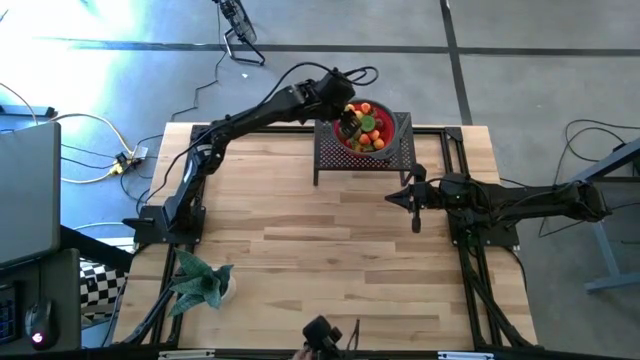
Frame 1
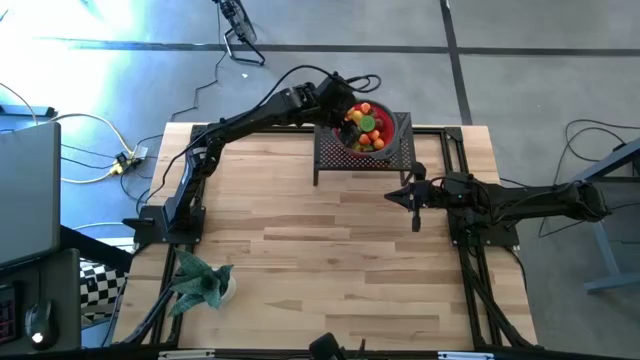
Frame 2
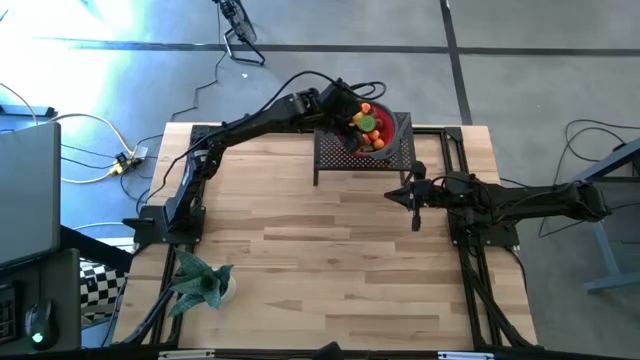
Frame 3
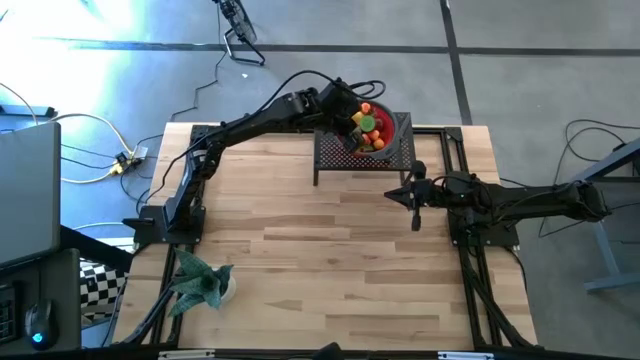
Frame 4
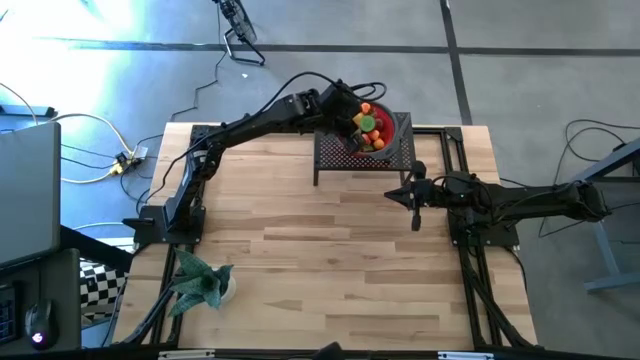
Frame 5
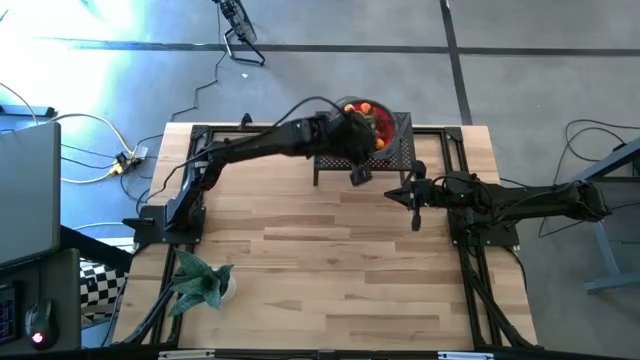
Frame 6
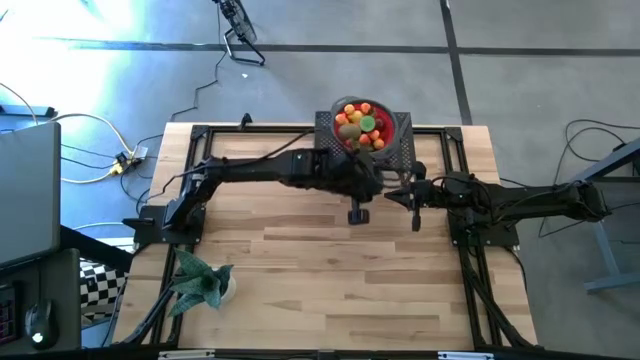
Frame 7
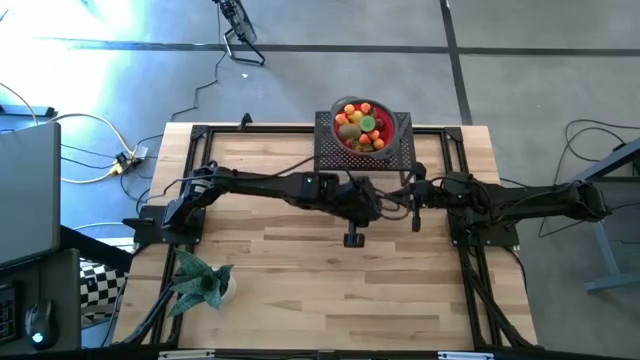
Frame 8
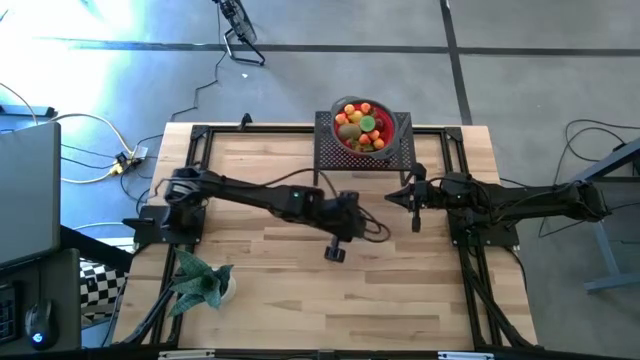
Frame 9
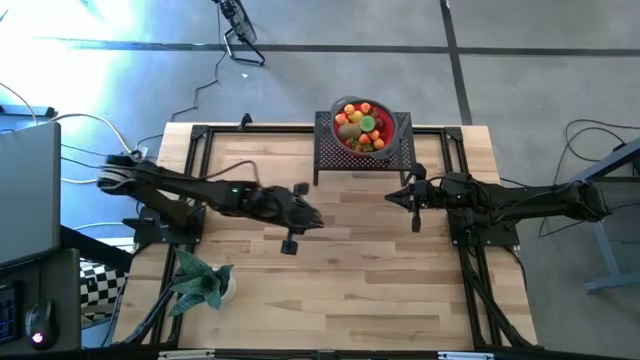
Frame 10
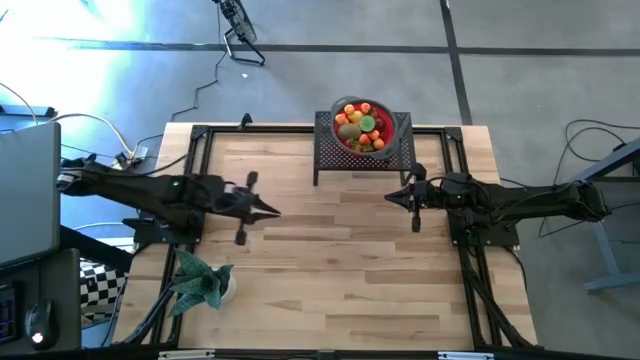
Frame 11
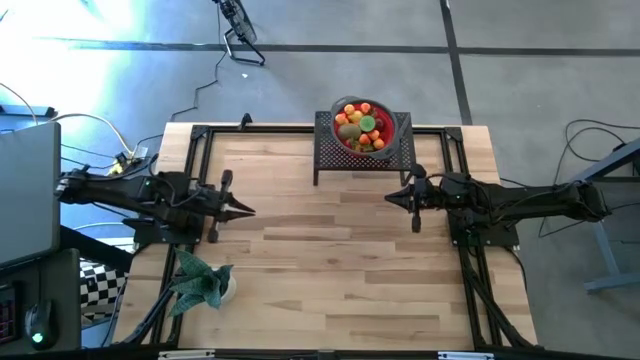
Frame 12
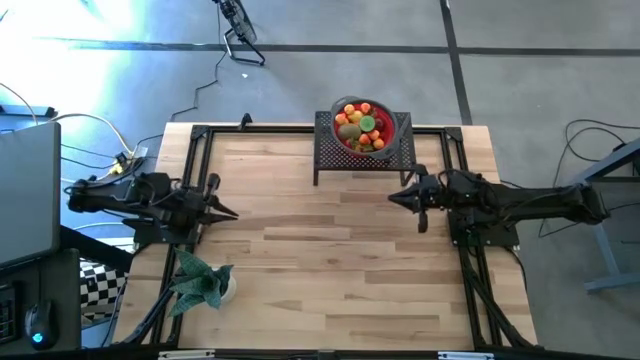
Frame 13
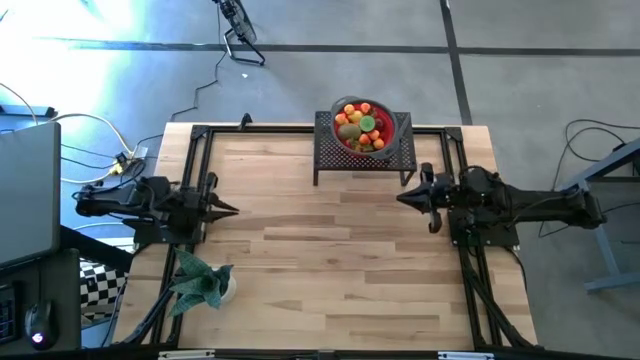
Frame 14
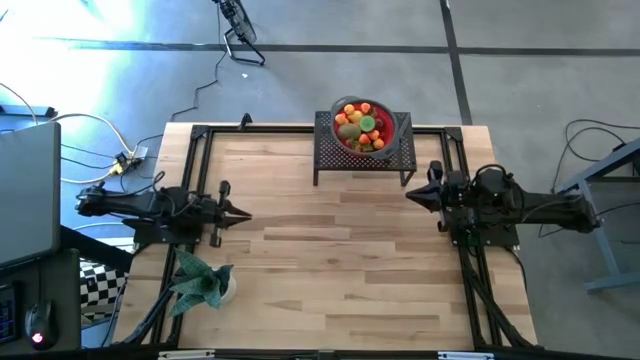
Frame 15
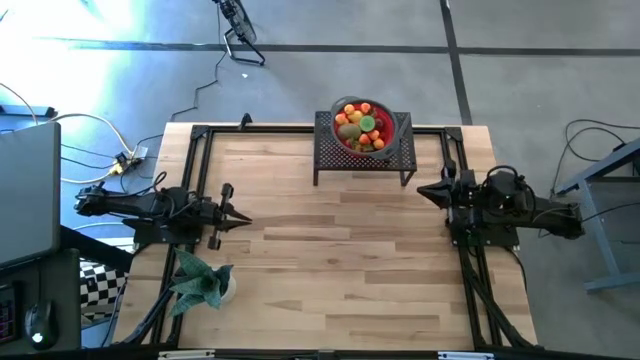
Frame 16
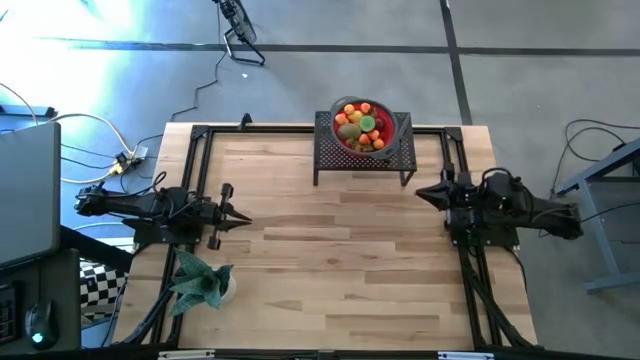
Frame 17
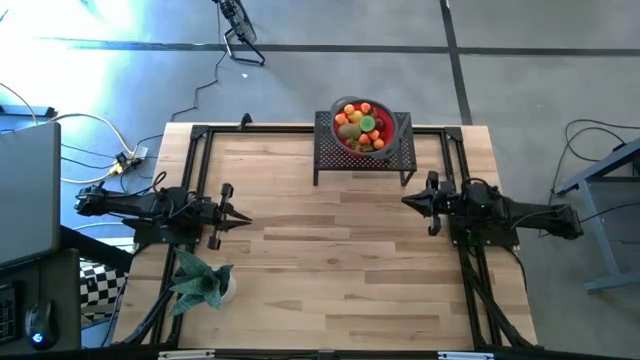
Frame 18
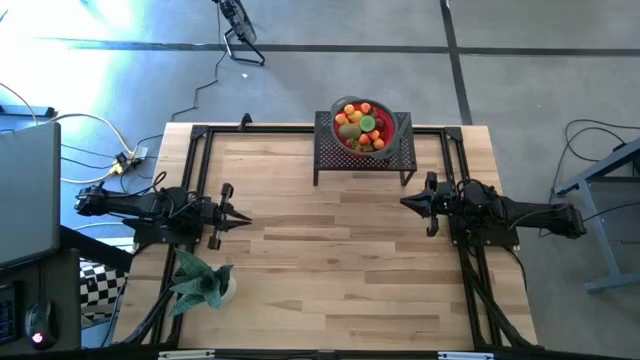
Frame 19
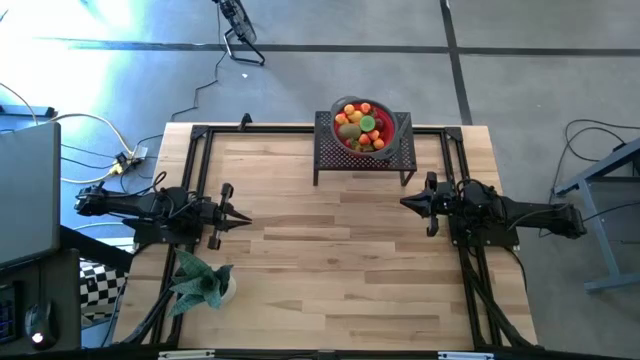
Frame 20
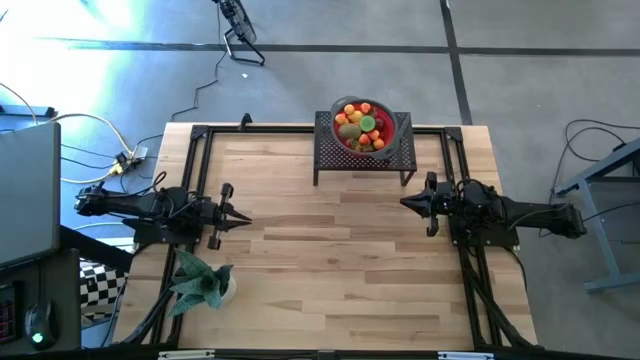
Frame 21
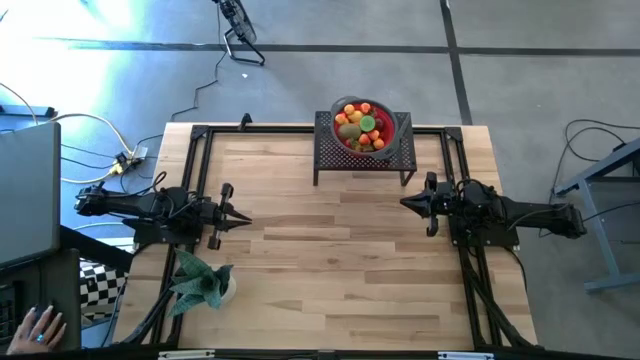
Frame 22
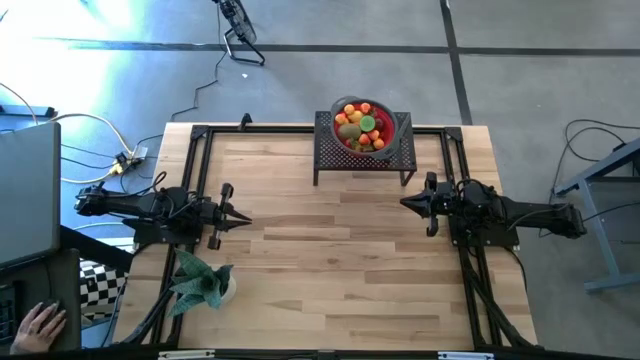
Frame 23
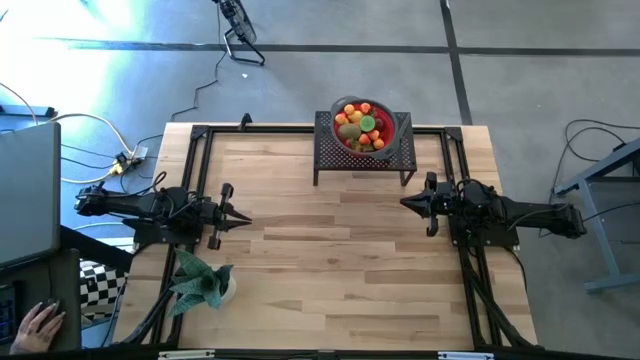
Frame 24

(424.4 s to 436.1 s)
Task: Pick & Place Fruit
Return to home position

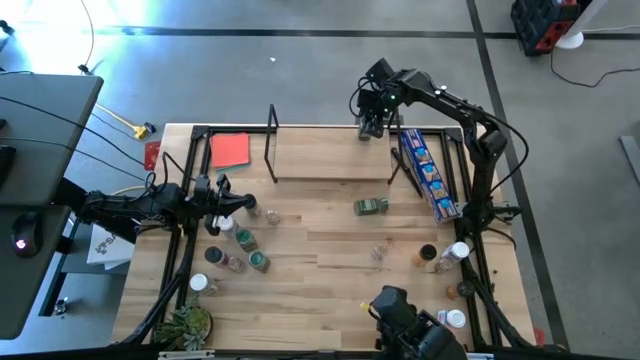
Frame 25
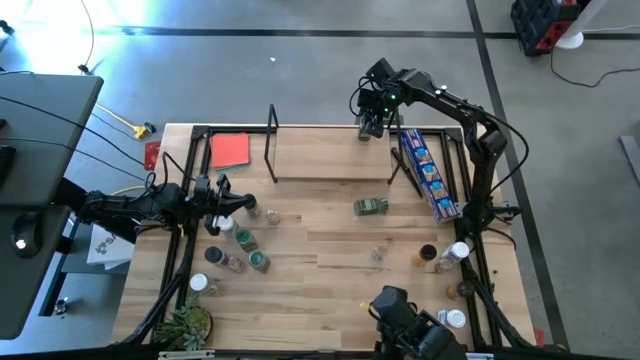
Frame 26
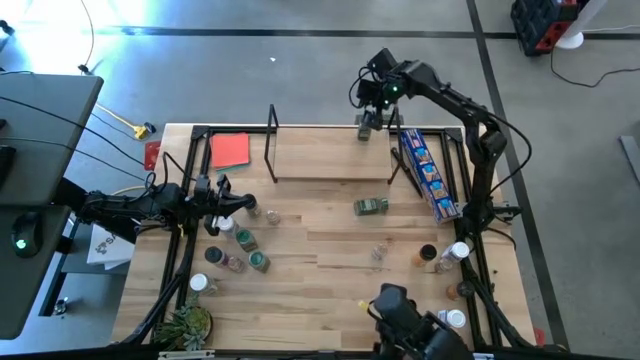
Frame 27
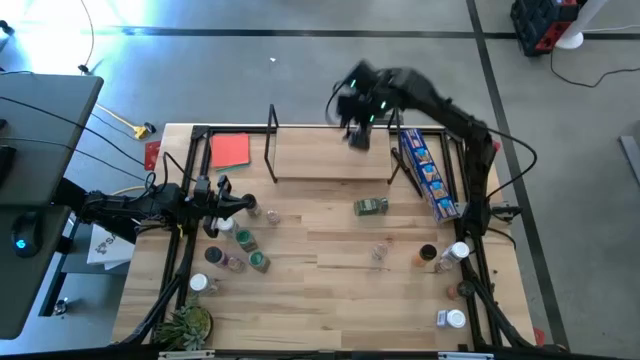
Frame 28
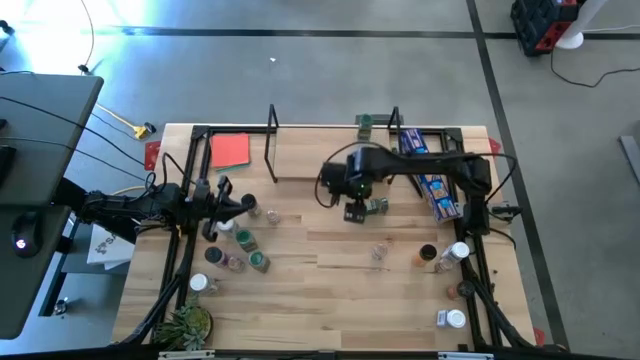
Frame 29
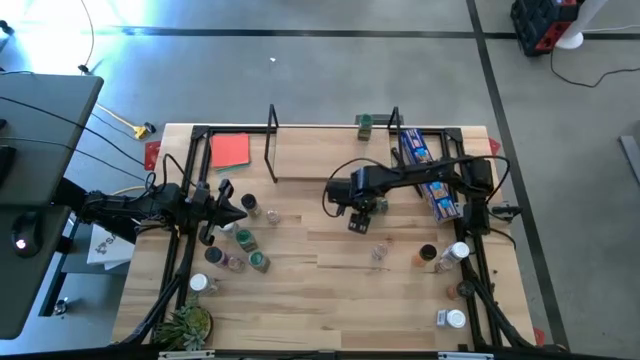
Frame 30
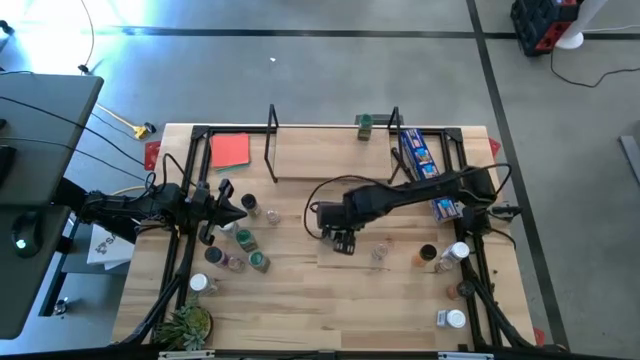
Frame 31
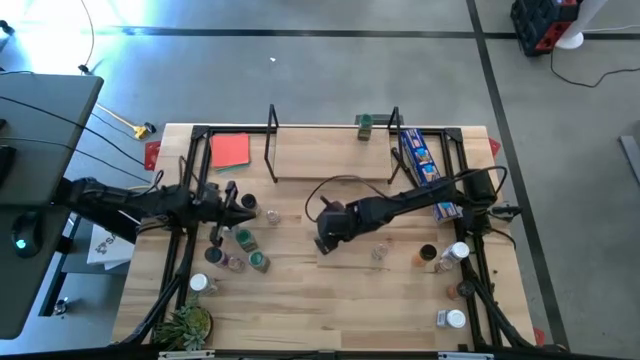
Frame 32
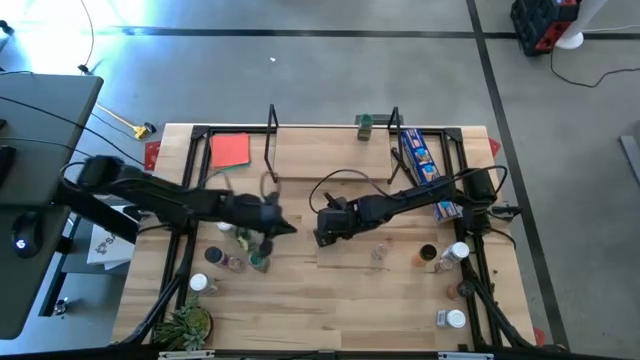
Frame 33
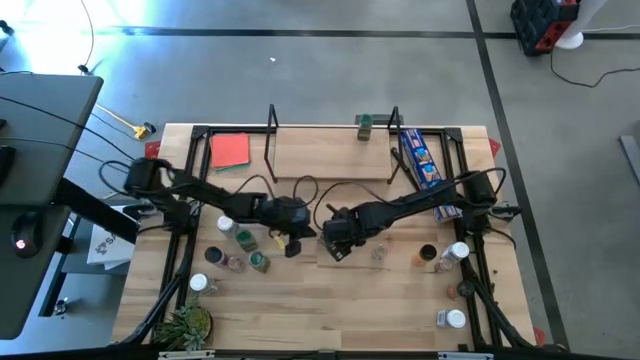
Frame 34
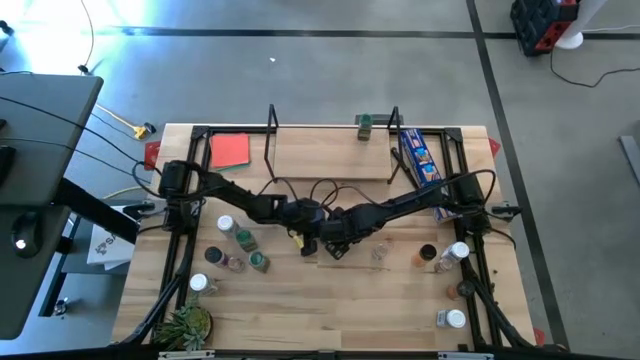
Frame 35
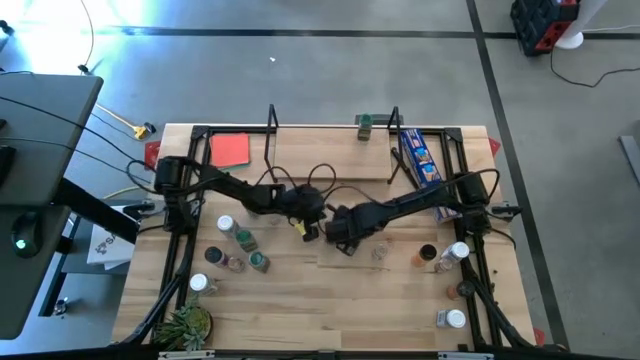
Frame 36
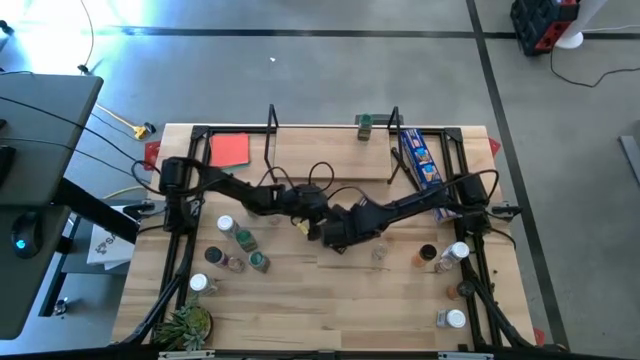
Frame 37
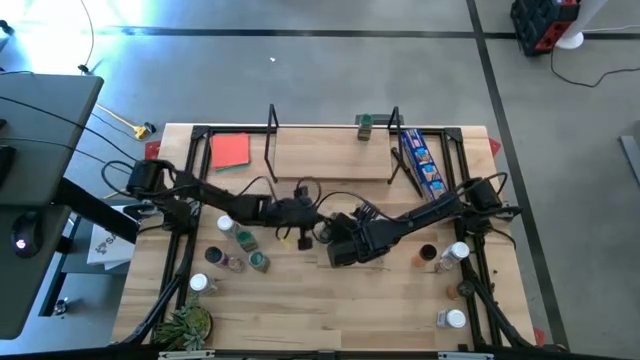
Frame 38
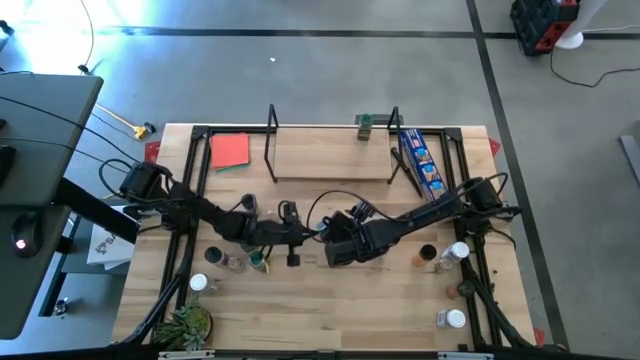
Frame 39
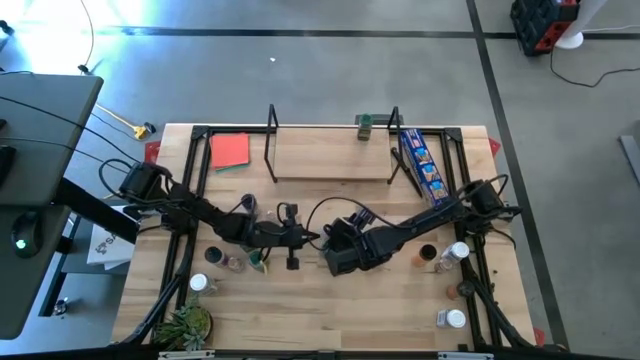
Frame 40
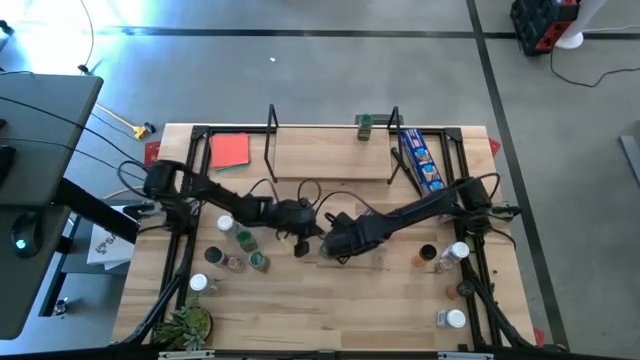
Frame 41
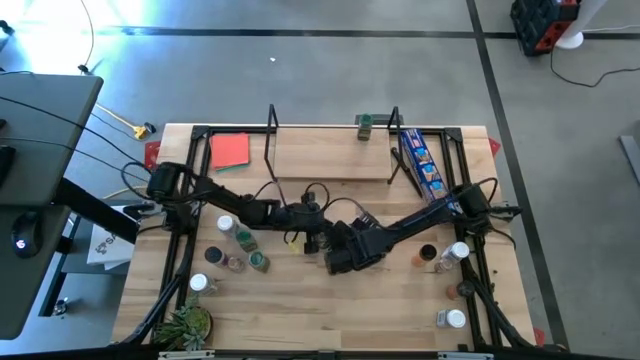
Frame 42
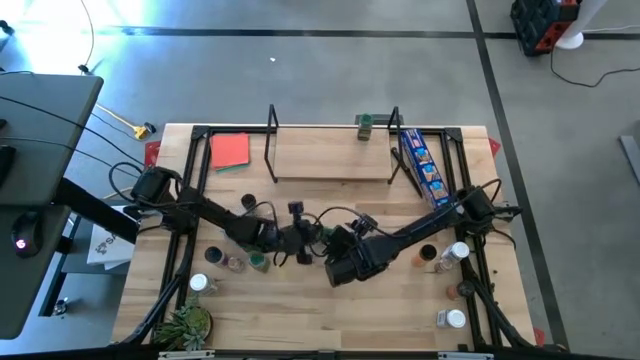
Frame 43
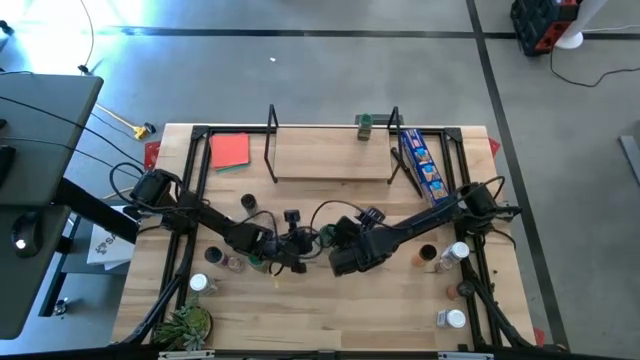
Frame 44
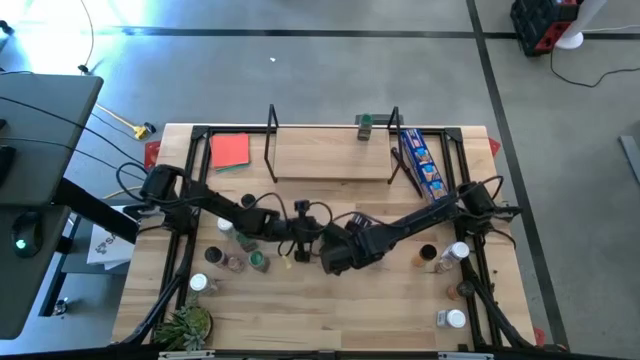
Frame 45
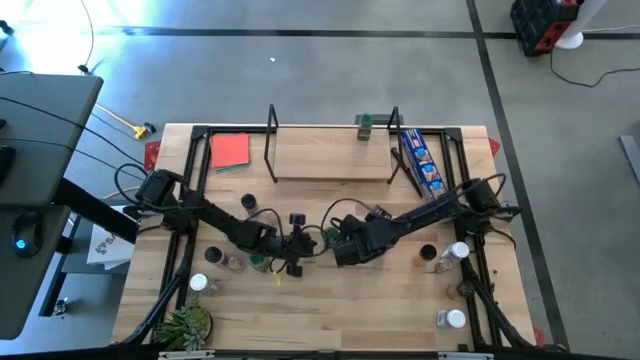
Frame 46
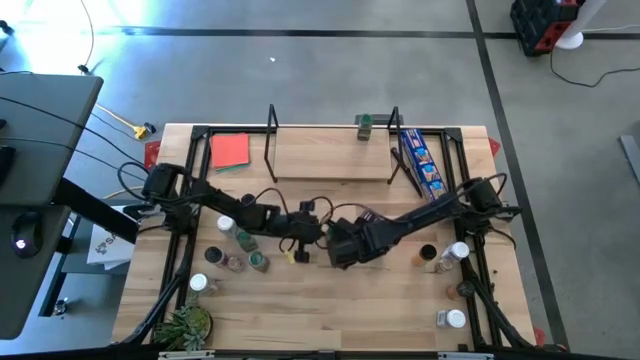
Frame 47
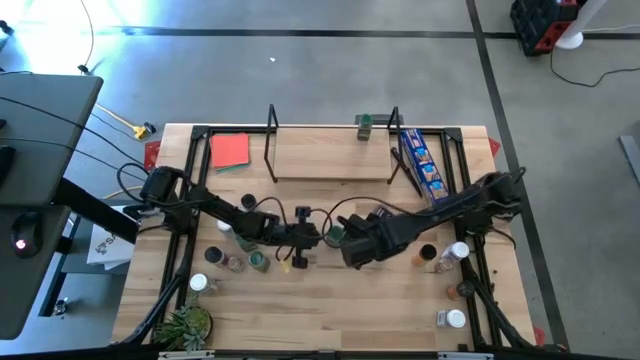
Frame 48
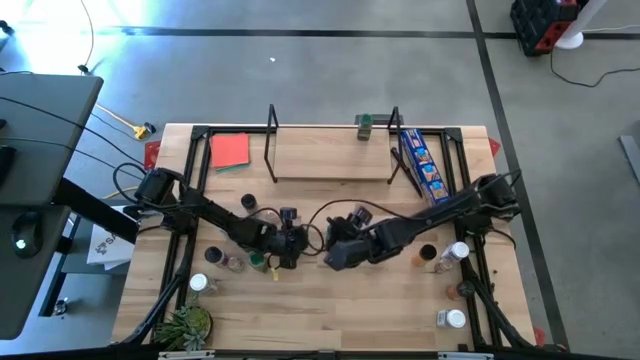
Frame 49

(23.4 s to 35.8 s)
Task: Shelf spices
Put the green seasoning bottle on the shelf aligned with the other green seasoning bottle
